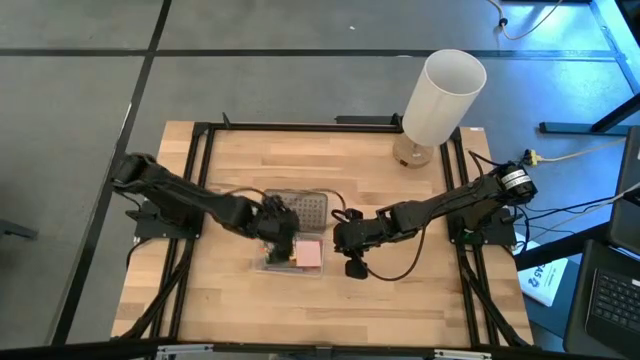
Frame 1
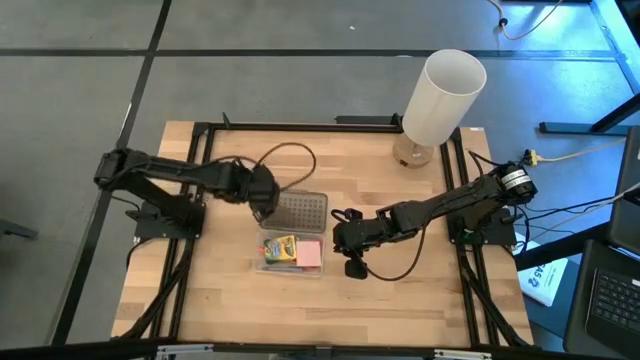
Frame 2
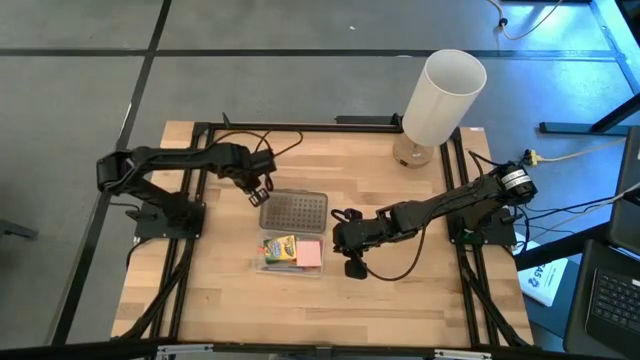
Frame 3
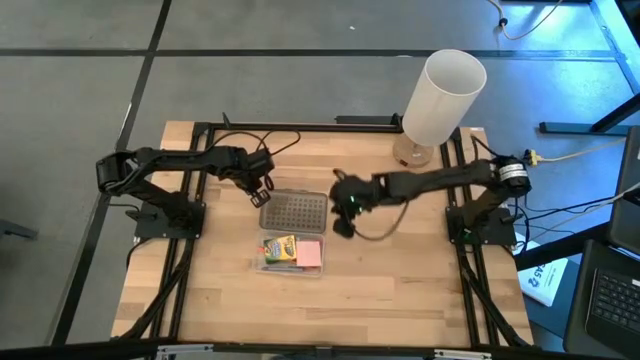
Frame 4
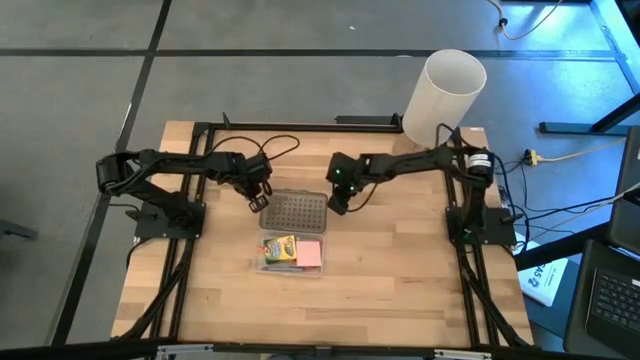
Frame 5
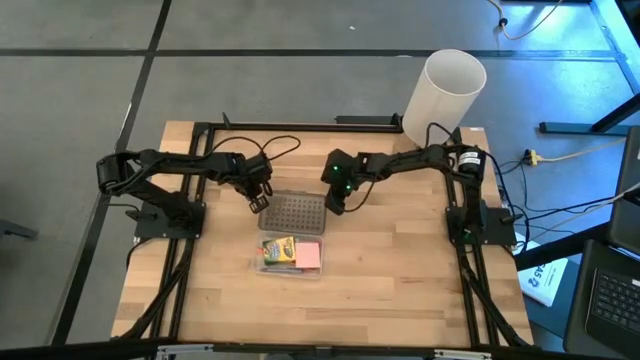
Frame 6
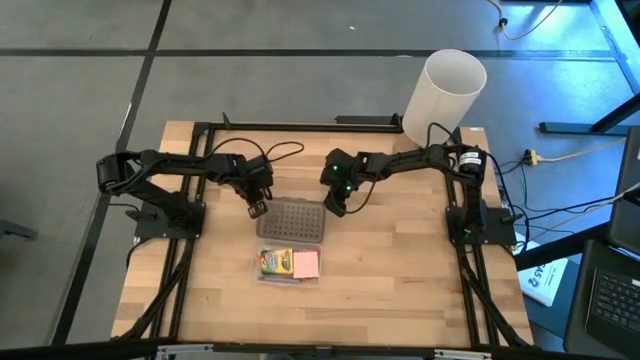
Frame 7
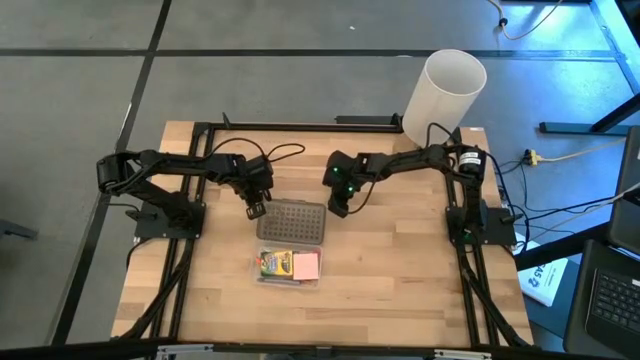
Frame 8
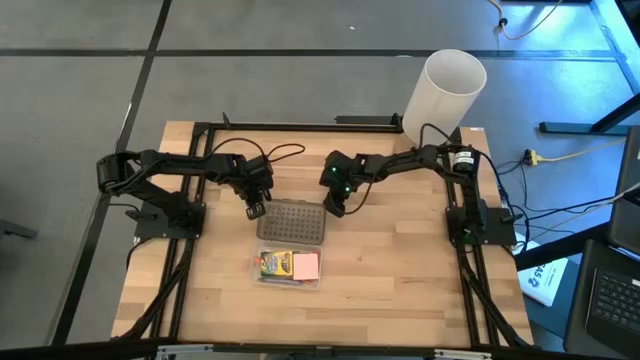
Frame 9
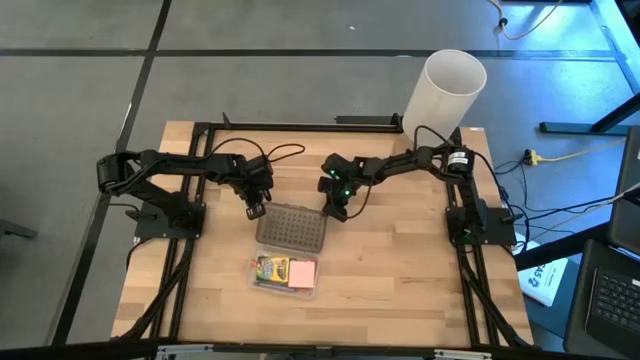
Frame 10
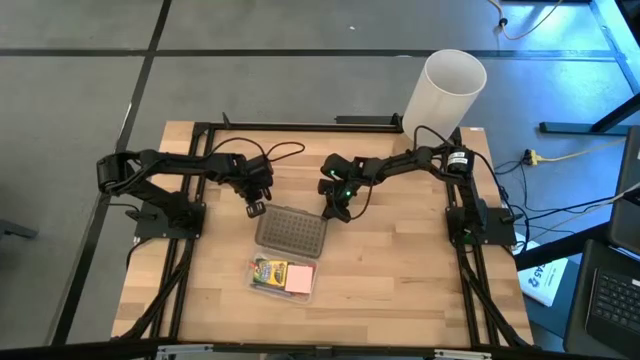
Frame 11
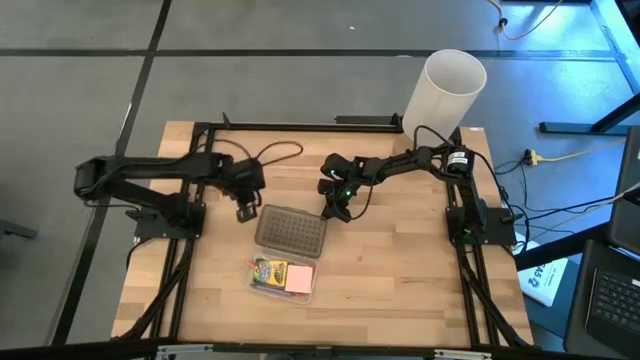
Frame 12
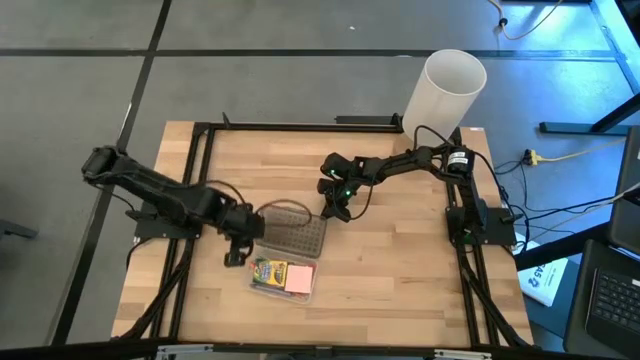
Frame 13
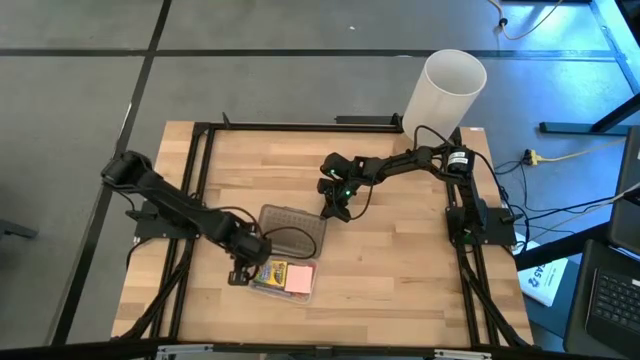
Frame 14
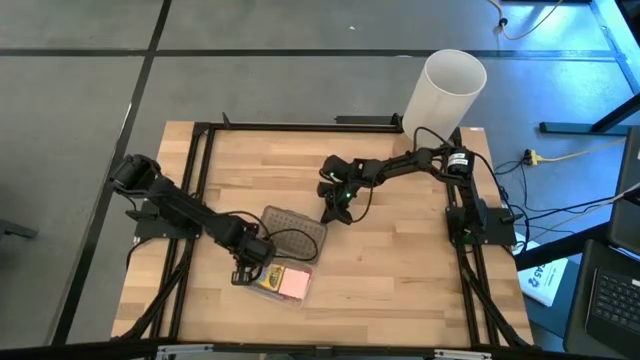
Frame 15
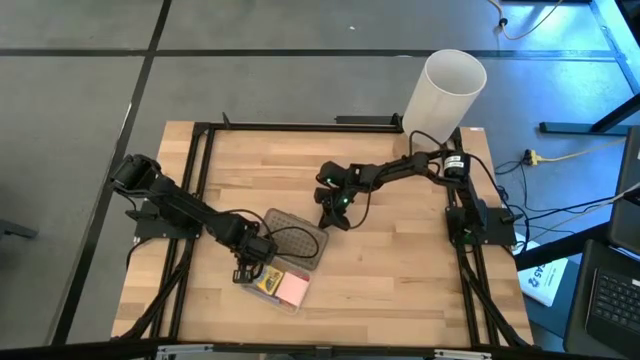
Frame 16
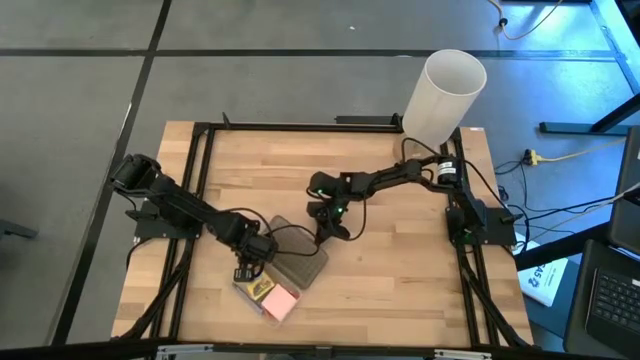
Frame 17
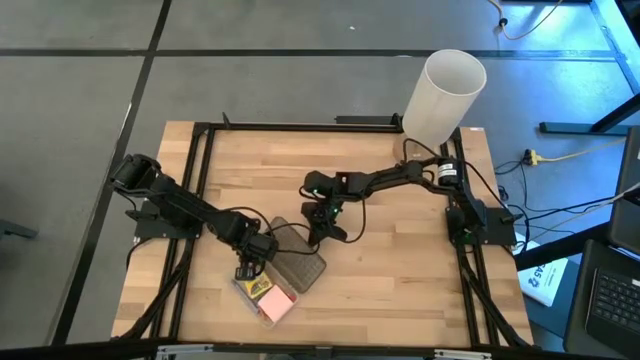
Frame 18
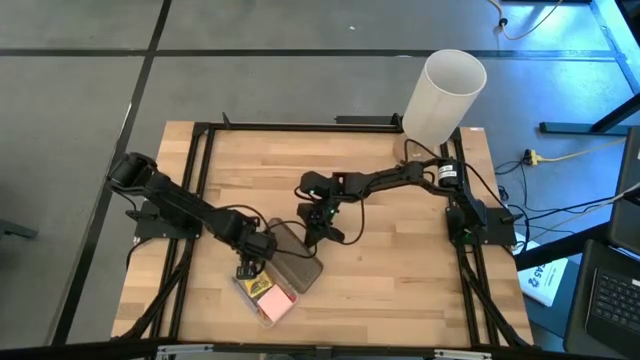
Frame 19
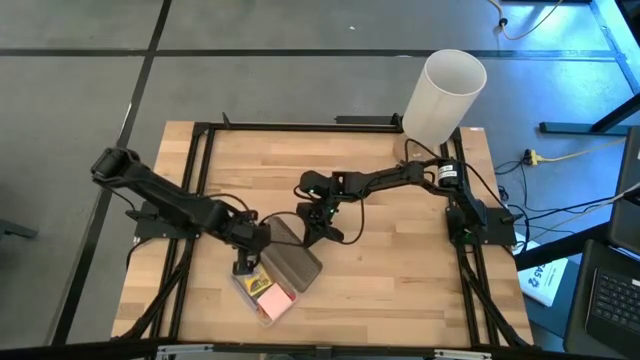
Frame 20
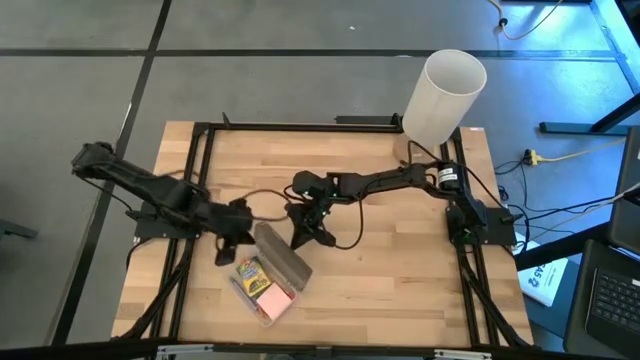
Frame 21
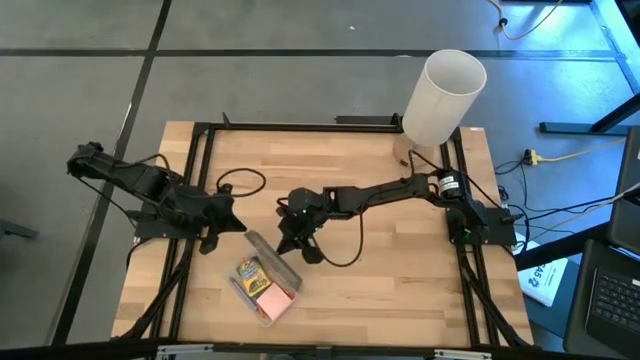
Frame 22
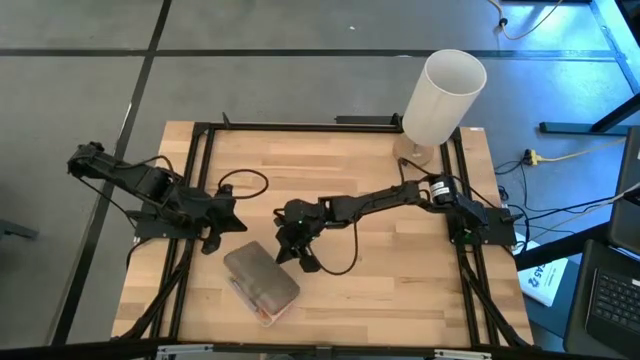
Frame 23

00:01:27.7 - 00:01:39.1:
Task: Pack school essentials
Close the lid of the supply box

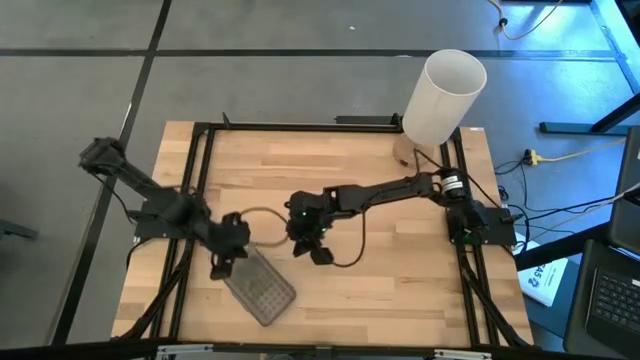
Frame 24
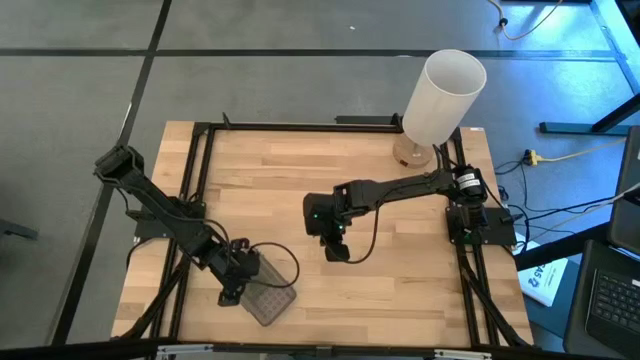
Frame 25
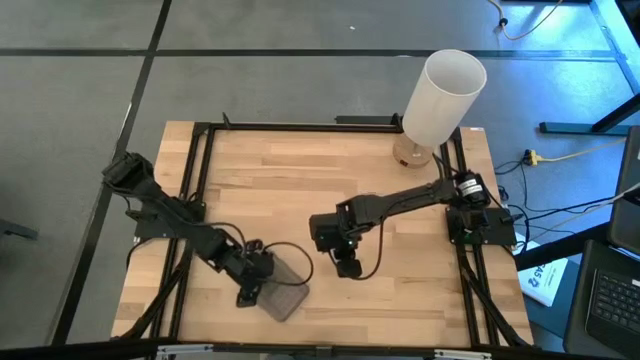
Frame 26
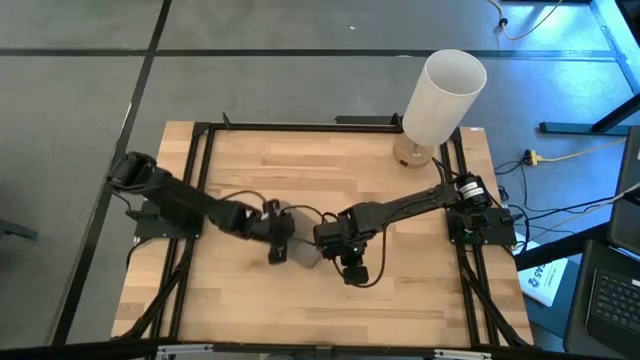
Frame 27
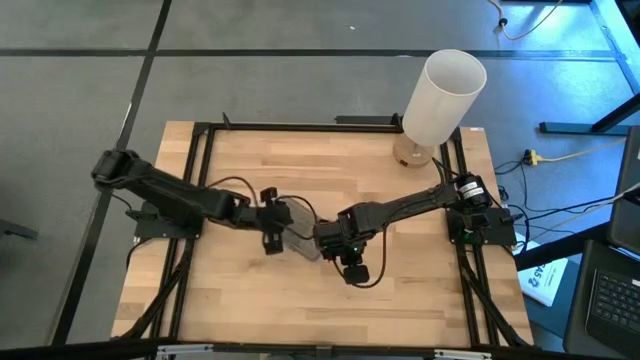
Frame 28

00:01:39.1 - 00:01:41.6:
Move the supply box to the middle of the table

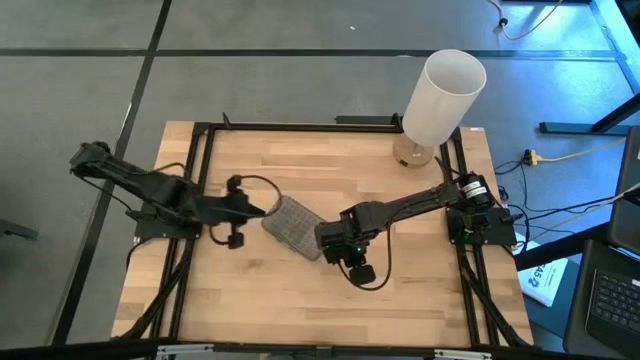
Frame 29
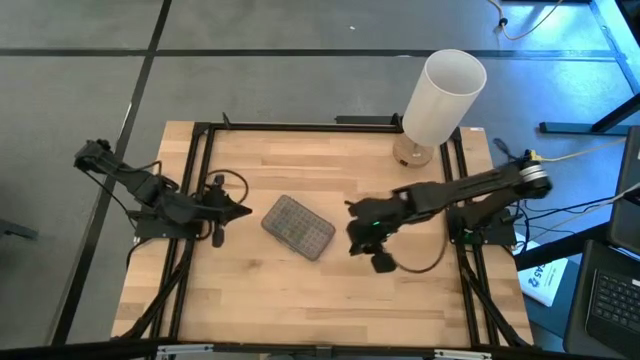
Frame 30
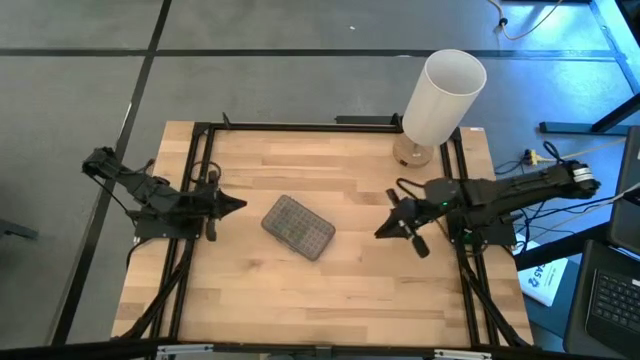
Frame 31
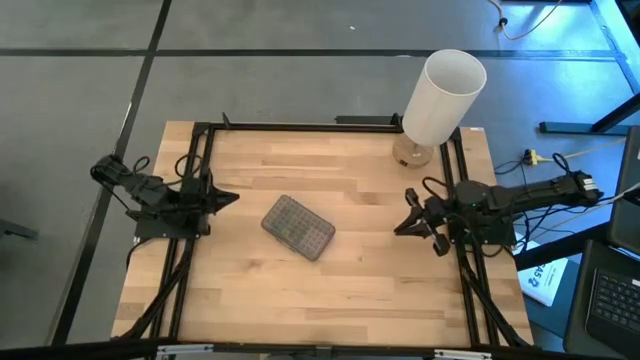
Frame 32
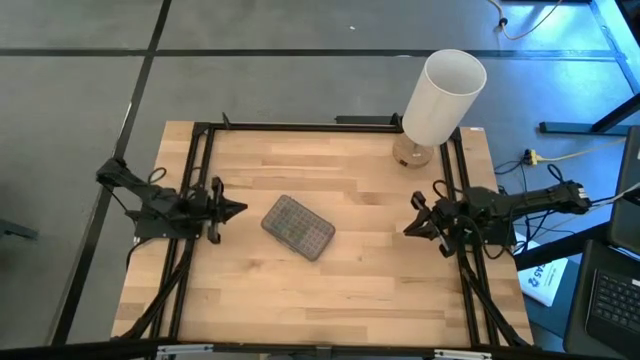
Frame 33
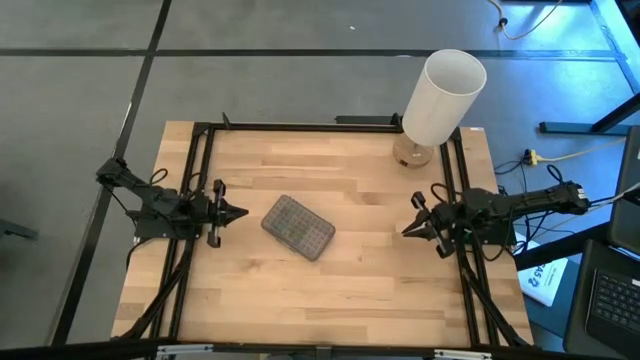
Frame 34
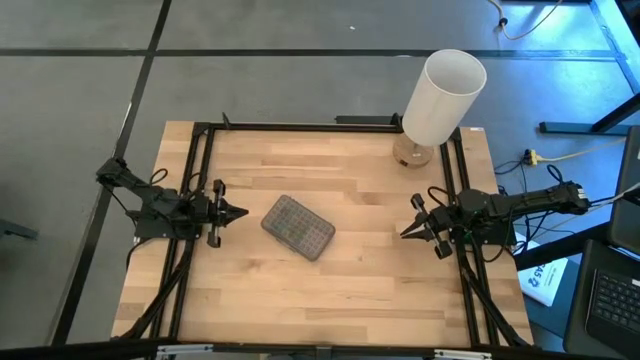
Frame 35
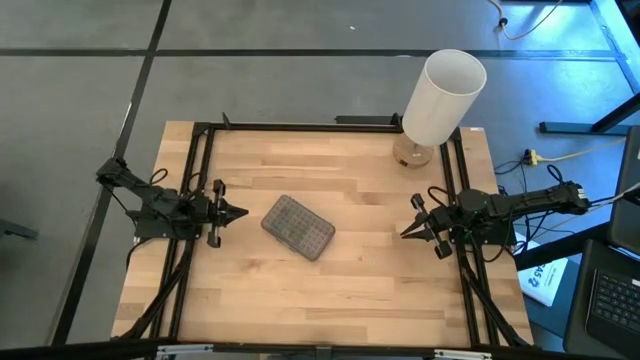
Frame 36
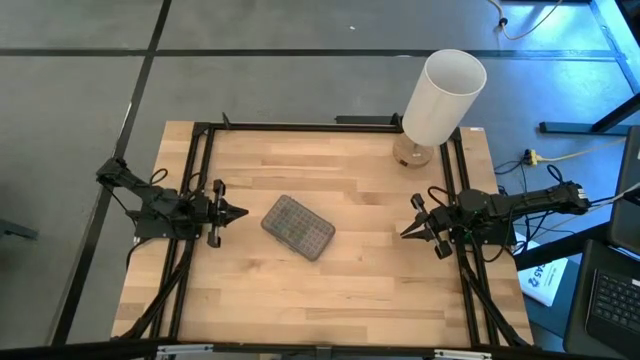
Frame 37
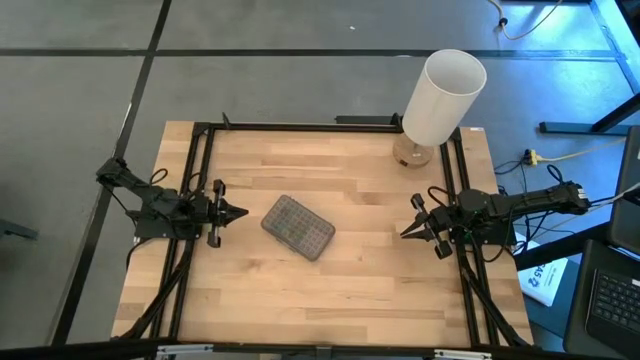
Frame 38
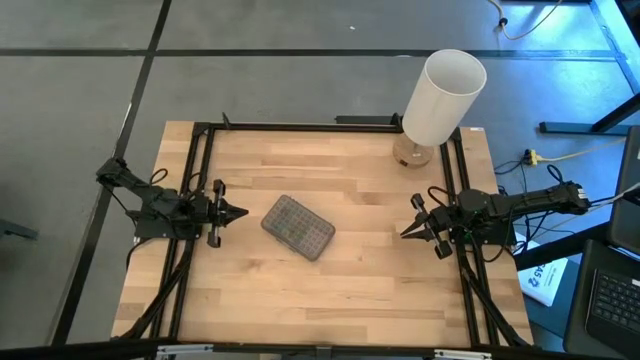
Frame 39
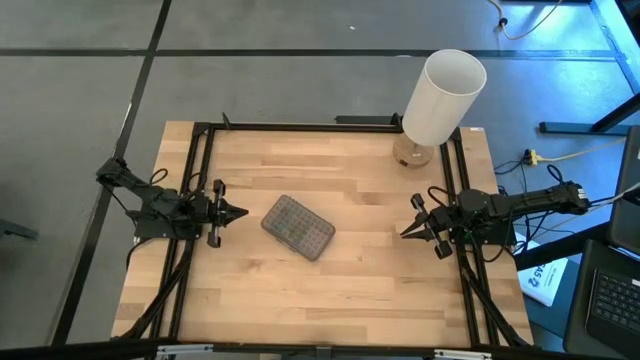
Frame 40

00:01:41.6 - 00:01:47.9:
Return to home position

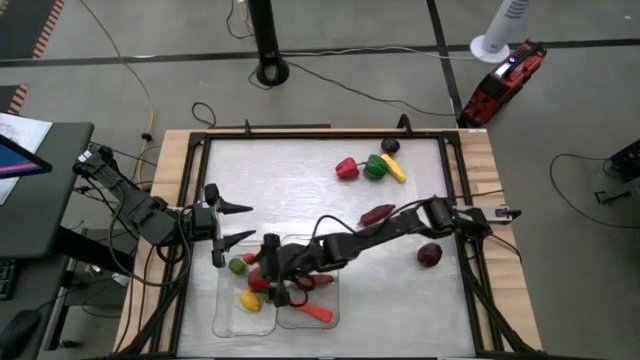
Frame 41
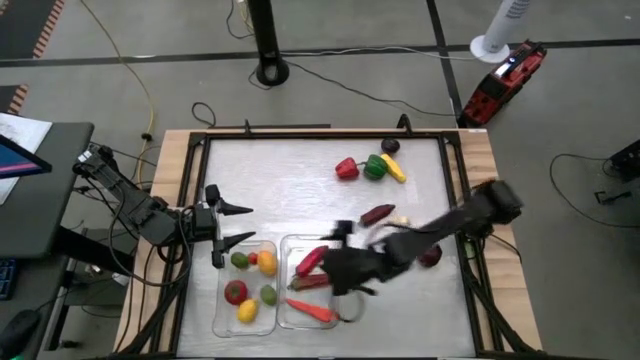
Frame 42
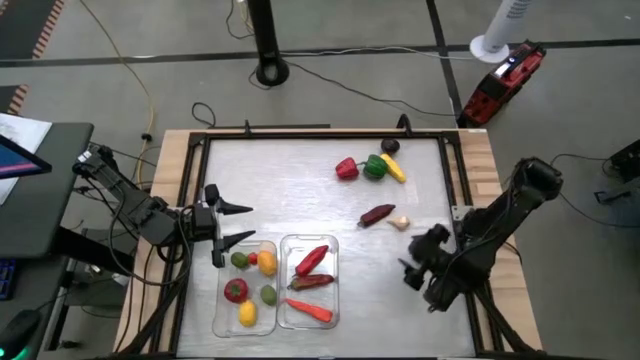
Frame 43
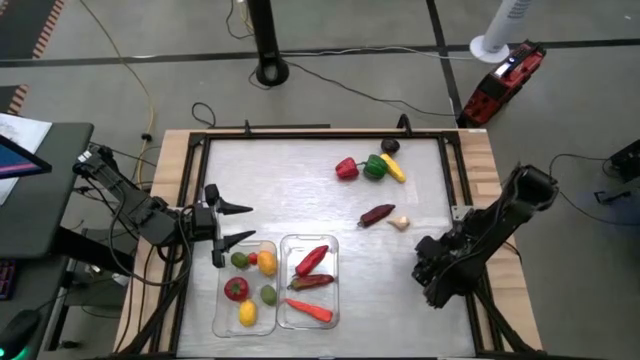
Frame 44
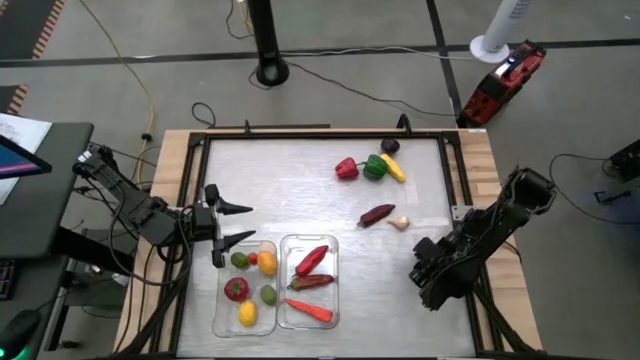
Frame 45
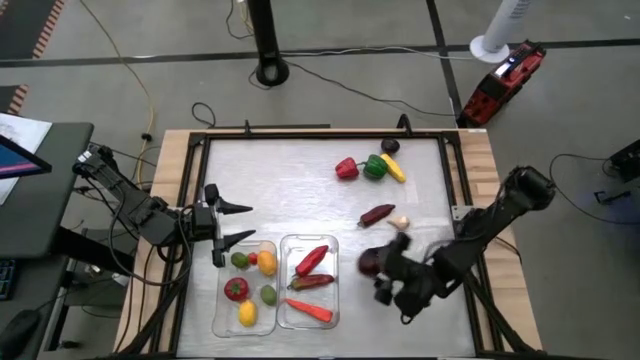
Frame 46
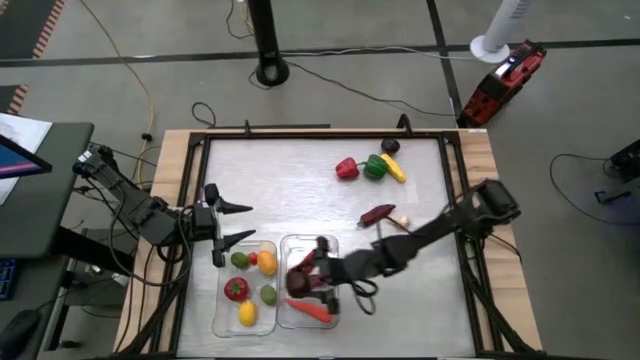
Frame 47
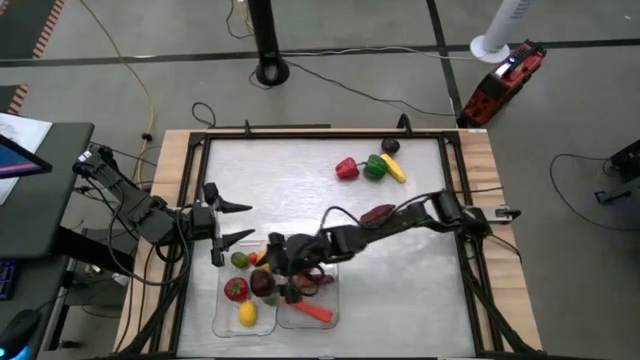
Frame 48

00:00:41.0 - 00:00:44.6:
Task: Sort produce into baskets
Put the dark red apple into the left transparent bin
